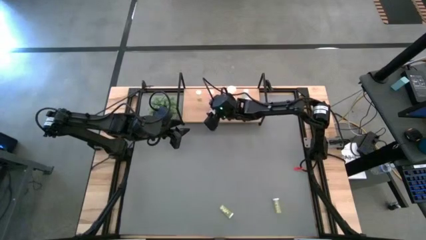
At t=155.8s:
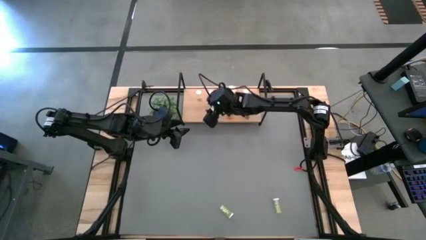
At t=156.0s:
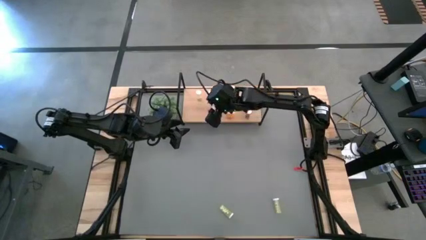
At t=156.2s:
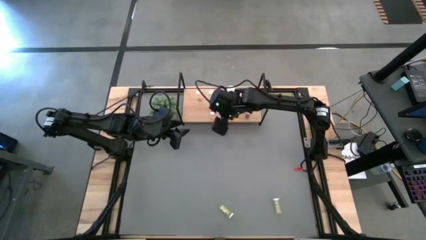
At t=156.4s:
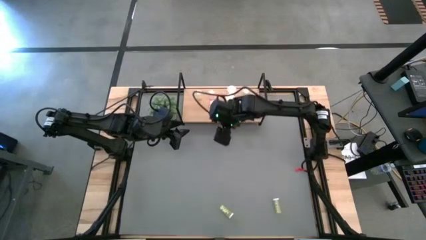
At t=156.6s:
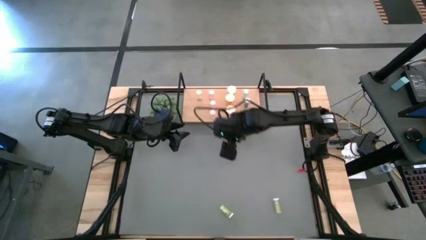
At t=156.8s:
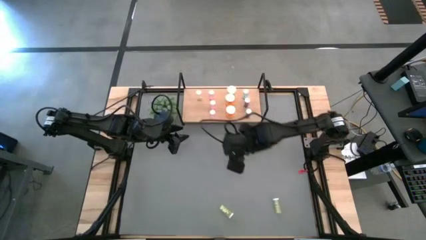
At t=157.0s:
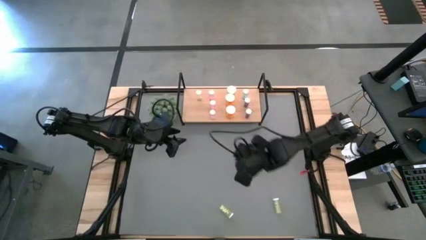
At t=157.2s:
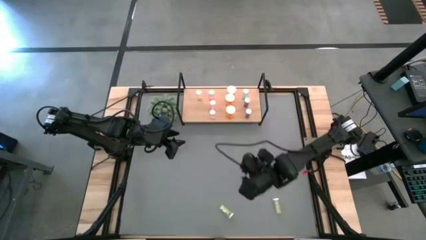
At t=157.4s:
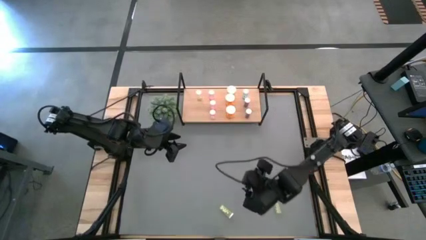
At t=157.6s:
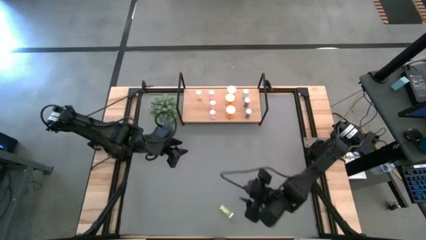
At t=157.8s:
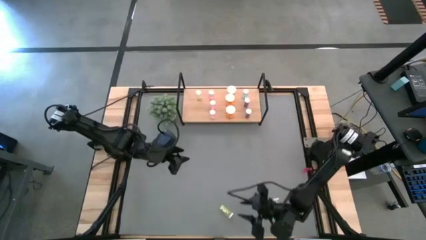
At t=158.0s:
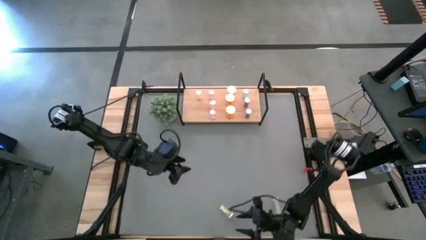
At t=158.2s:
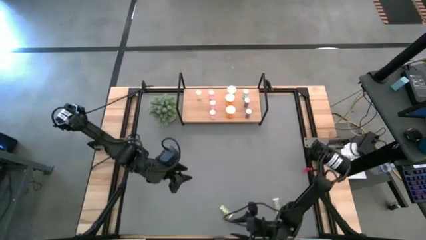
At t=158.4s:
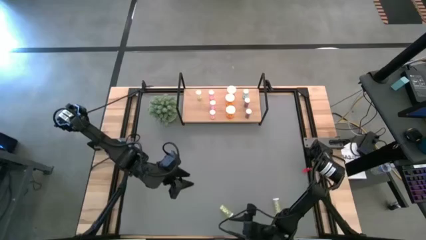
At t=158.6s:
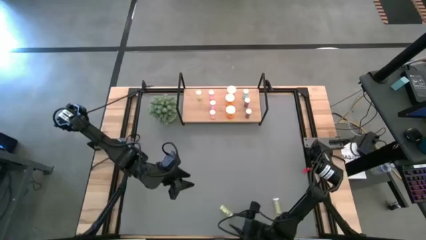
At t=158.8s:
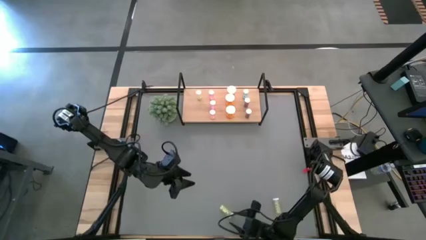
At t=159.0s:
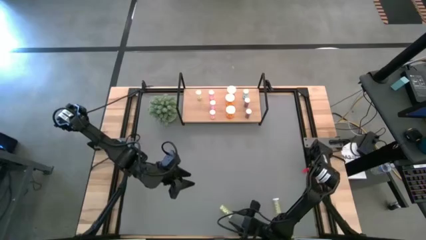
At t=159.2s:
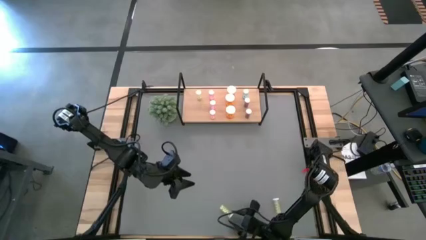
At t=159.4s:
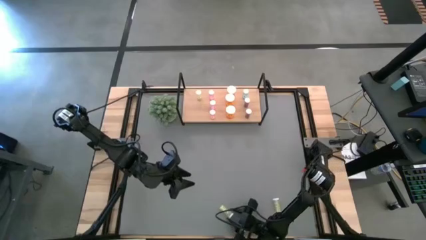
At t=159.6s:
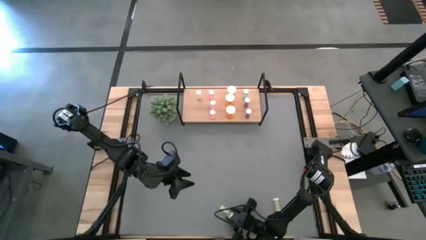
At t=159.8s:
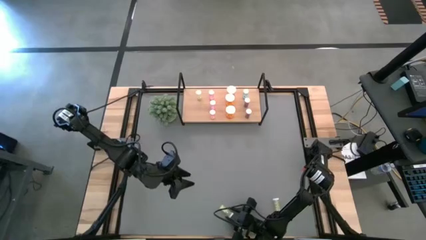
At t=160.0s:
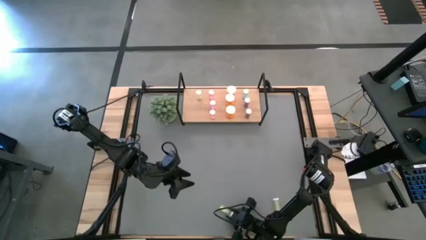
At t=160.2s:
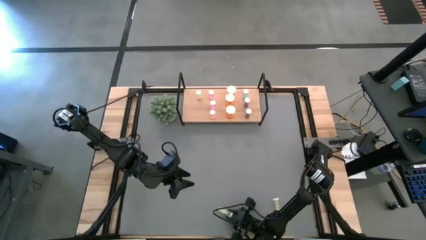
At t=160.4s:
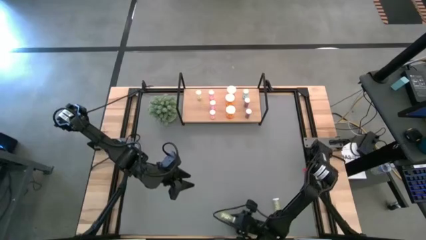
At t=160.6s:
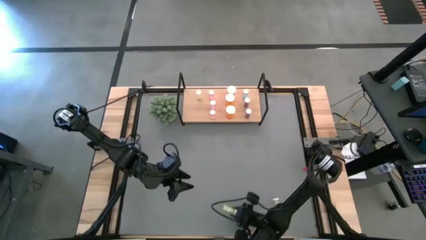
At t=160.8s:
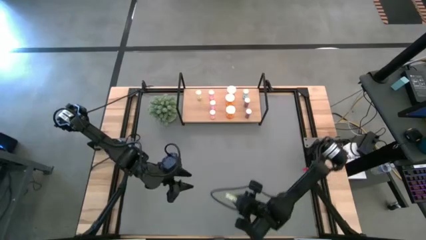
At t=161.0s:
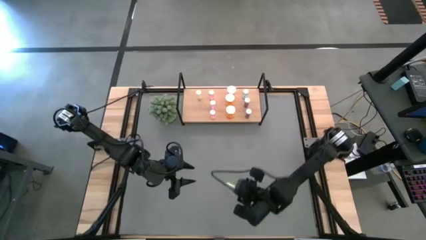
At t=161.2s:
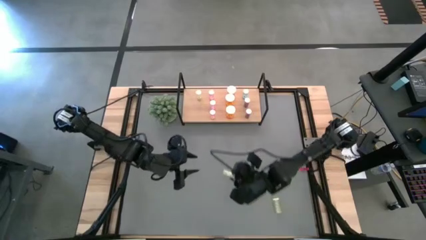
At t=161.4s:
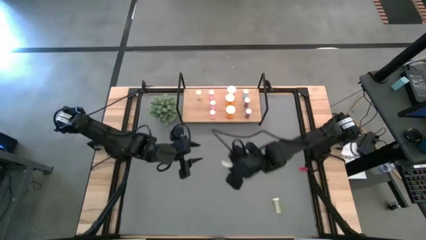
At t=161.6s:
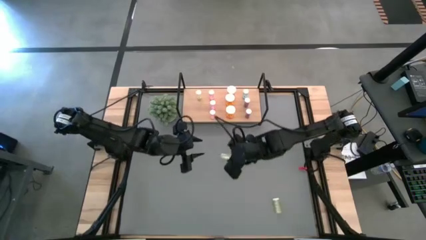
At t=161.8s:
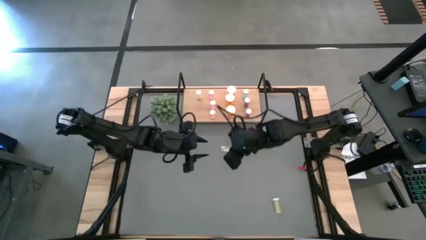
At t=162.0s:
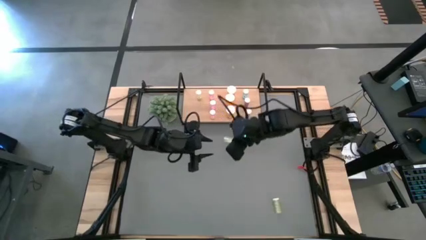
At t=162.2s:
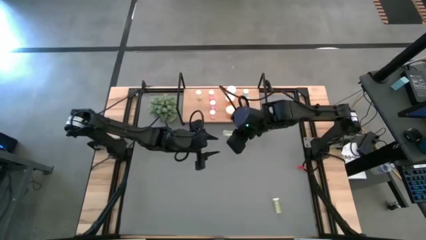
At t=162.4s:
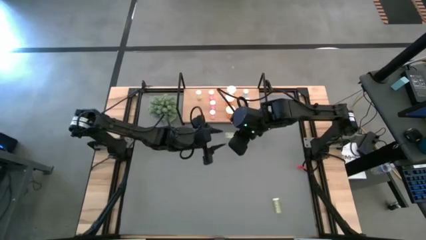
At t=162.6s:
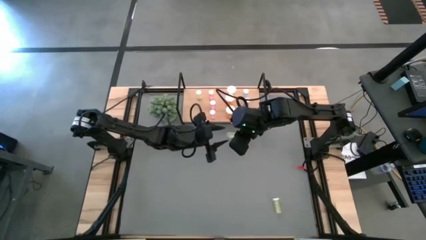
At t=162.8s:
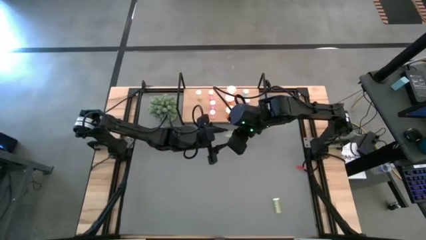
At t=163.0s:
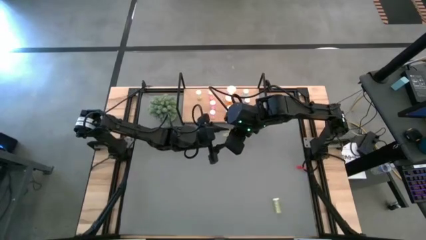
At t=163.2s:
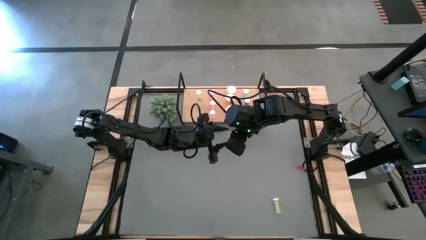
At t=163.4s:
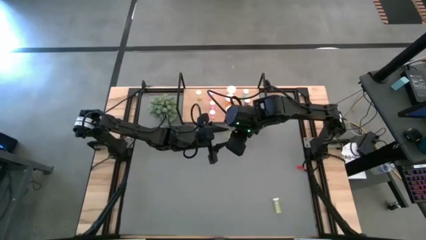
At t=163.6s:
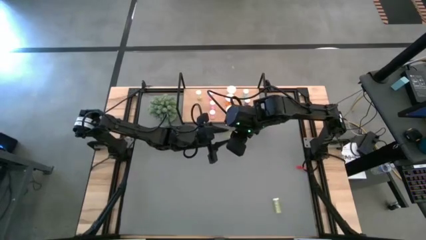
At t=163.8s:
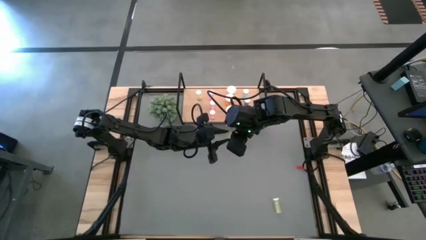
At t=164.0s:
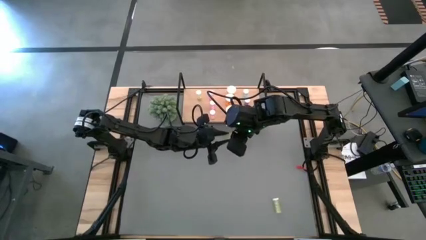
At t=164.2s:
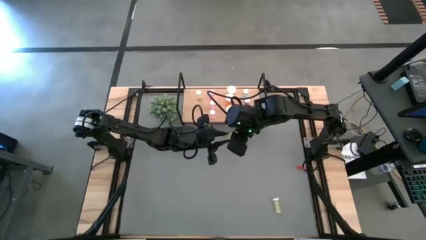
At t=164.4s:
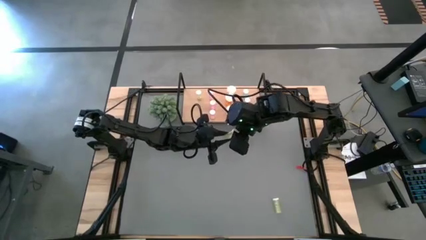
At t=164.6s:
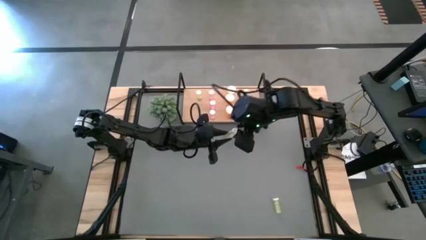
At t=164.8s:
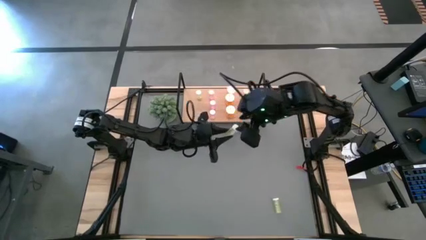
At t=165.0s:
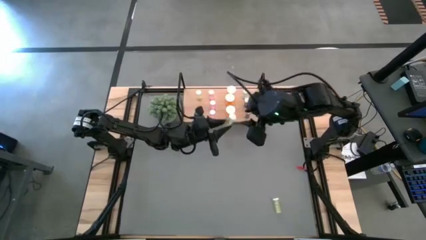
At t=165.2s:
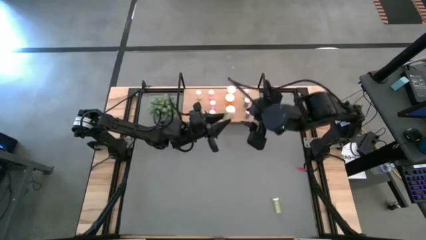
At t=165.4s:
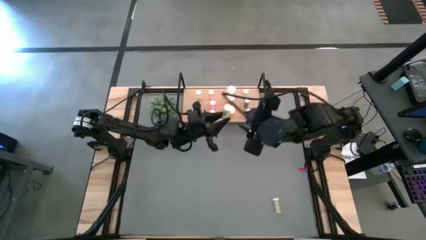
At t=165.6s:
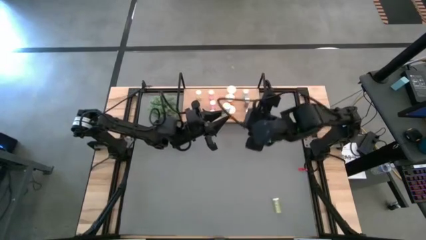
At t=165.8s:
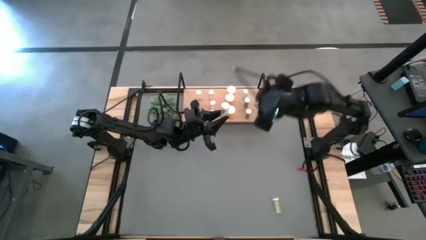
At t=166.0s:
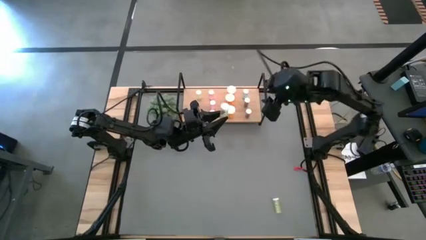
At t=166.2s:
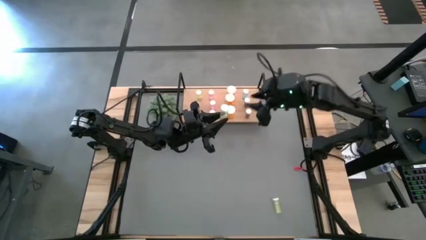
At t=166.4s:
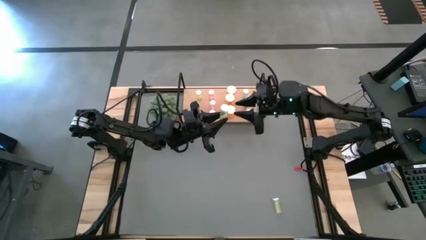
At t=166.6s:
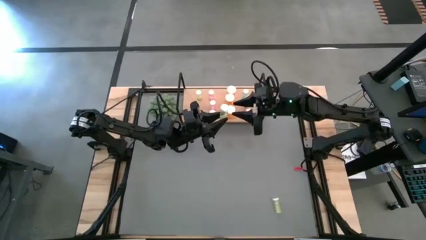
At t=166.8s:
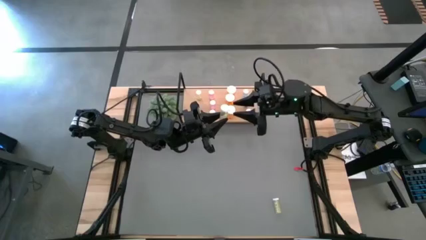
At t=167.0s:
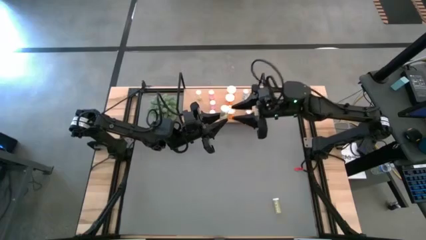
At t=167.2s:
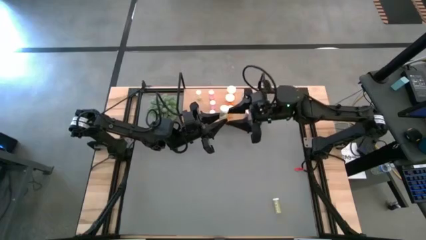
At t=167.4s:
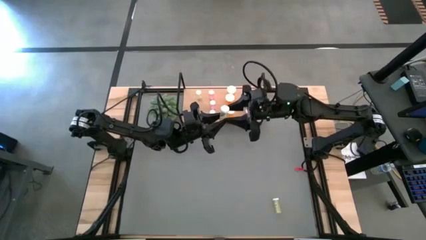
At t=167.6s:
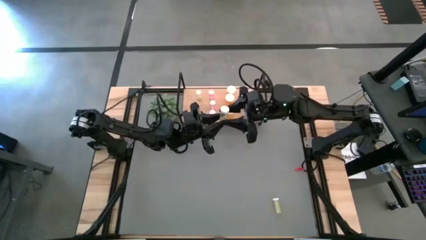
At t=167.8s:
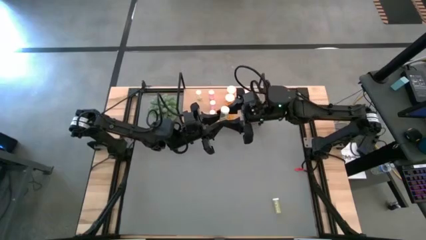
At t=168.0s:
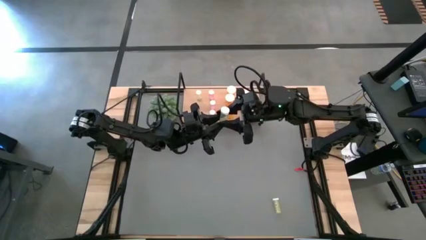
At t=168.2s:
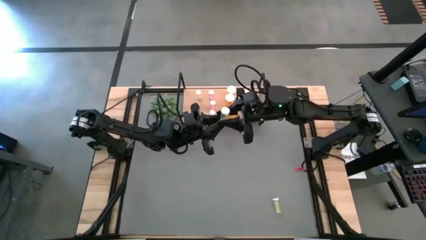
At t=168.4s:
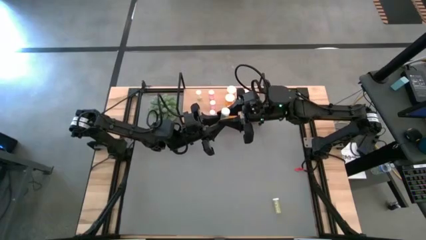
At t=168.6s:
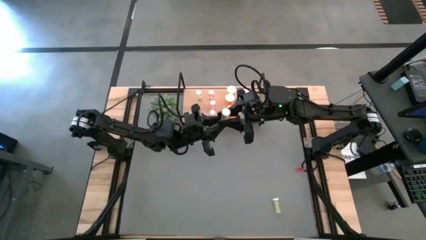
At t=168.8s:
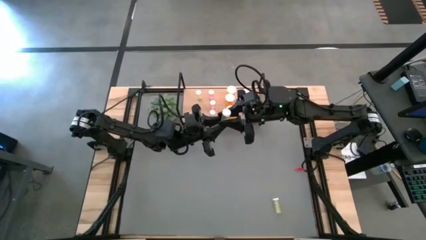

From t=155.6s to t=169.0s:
Task: Pick and place medicine bottles onto shelf by color
Put the left yellow pill bottle on the shelf aligned with the other yellow pill bottle

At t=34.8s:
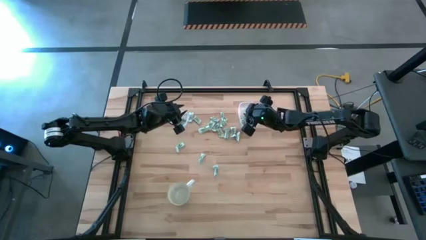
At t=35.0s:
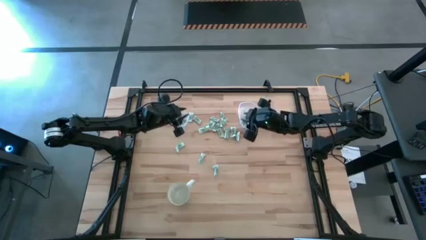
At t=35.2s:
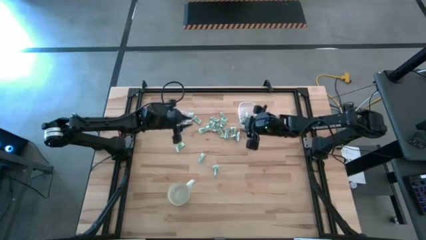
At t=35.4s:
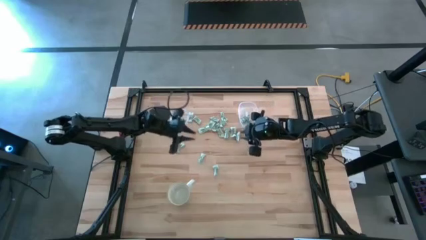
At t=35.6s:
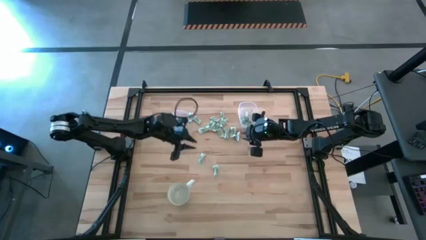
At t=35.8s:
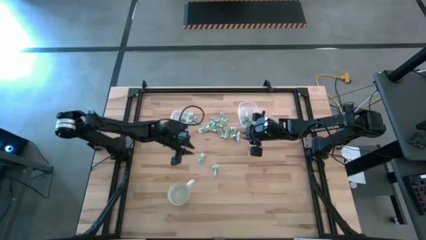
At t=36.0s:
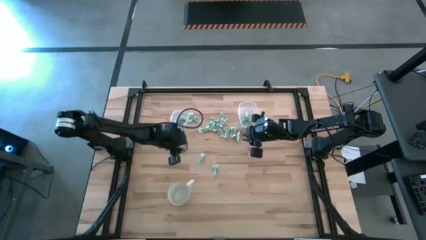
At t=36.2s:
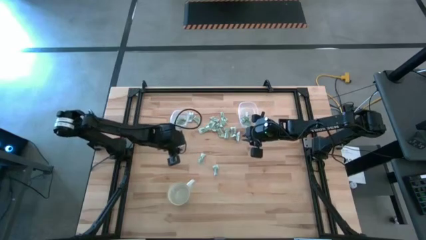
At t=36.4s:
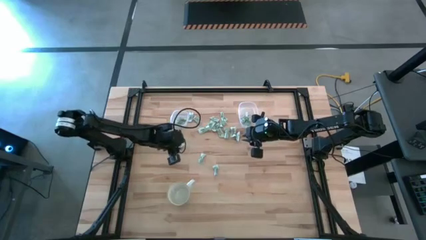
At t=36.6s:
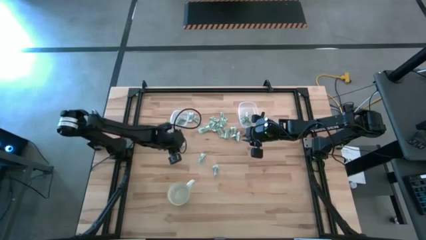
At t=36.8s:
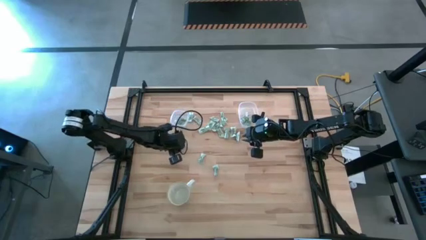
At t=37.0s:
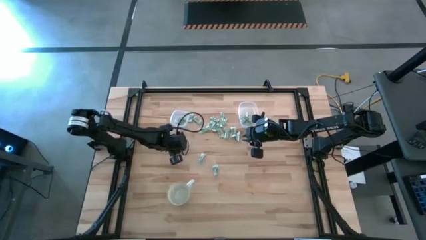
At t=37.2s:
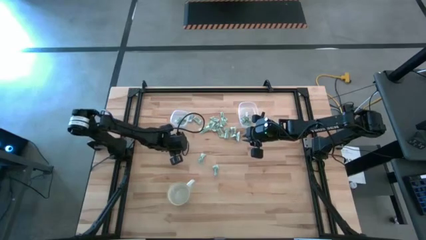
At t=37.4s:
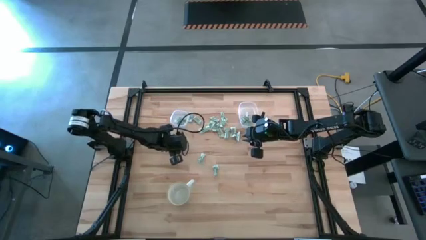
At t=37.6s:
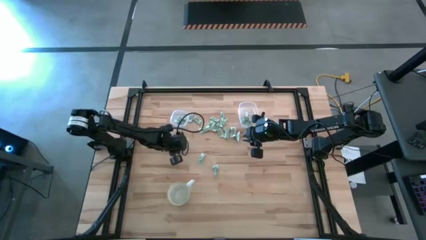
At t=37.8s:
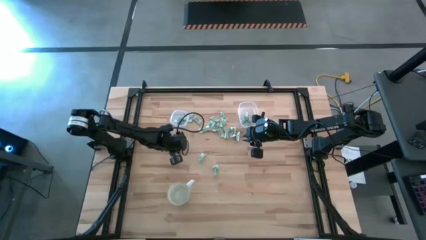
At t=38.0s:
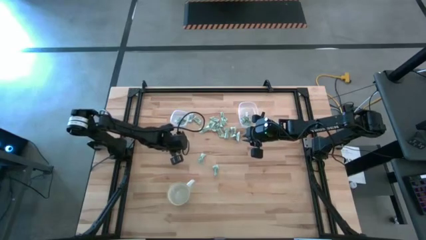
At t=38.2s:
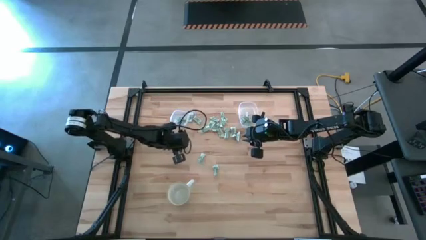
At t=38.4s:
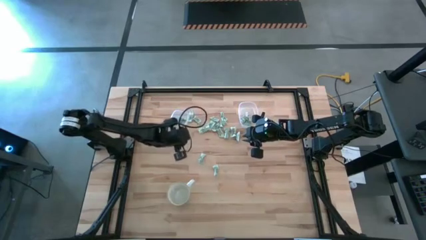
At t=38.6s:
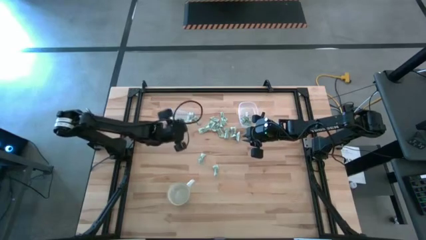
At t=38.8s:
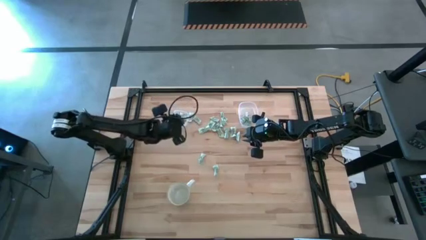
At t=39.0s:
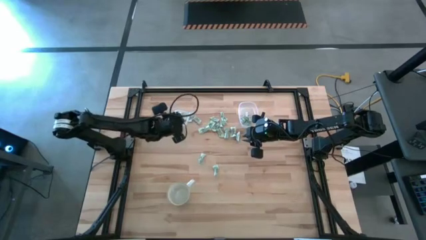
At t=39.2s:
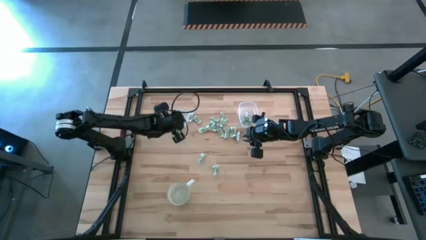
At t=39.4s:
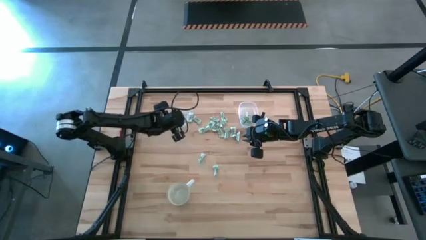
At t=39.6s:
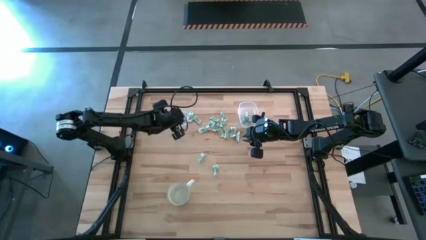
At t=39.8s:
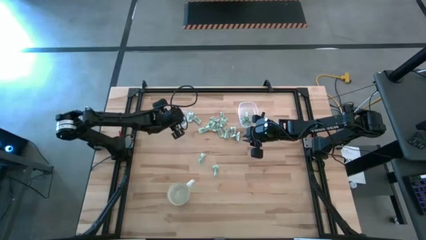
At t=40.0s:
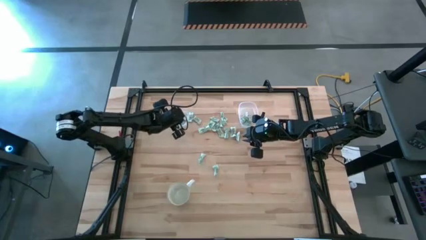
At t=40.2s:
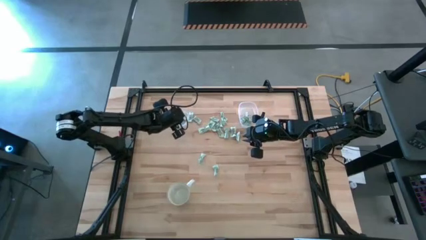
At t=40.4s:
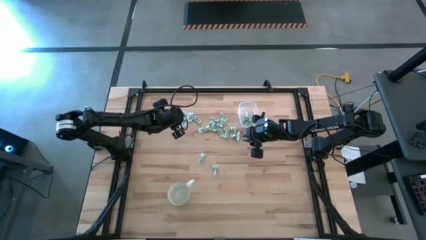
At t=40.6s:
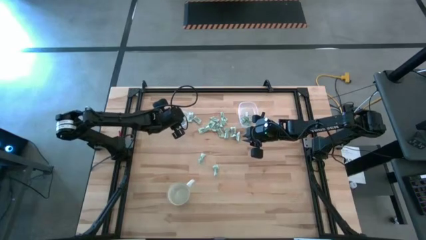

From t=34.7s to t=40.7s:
Task: Pick and place items into bin
Put the green stevia packet into the square transparent bin
